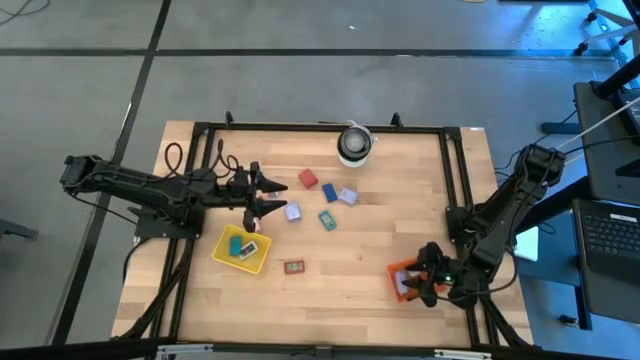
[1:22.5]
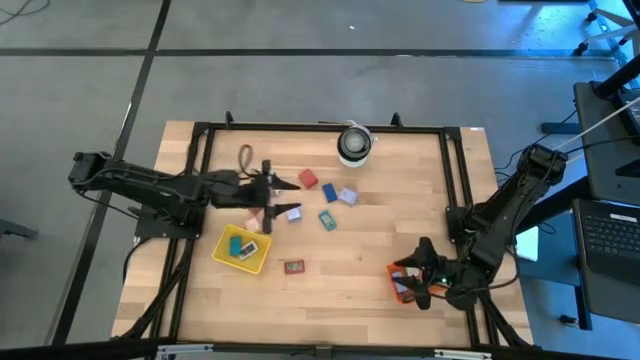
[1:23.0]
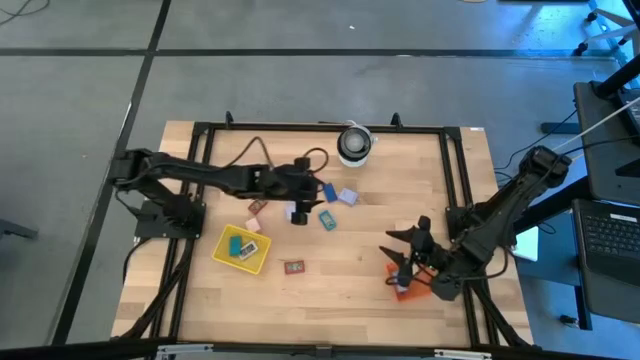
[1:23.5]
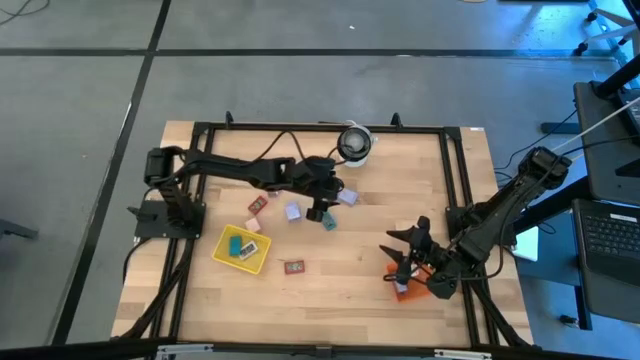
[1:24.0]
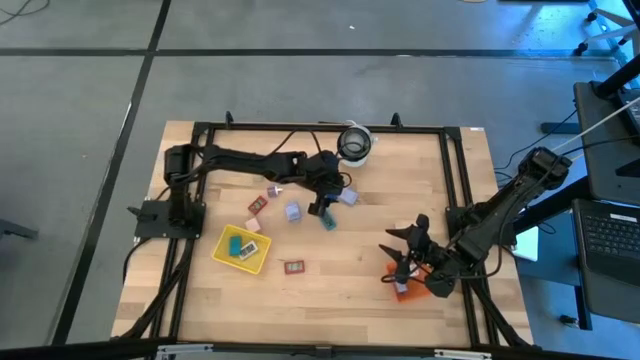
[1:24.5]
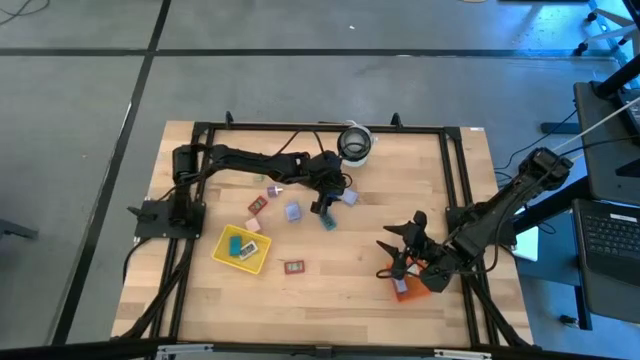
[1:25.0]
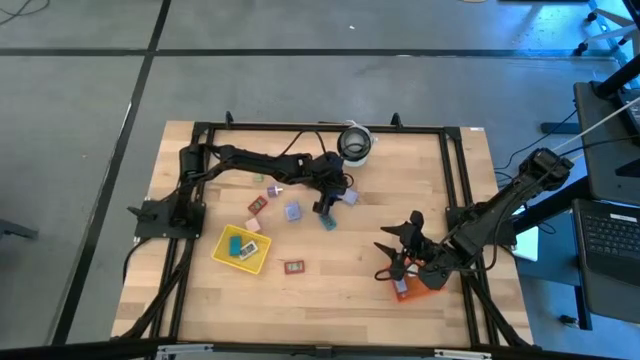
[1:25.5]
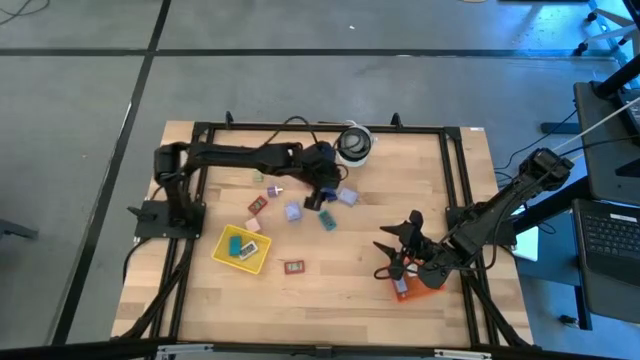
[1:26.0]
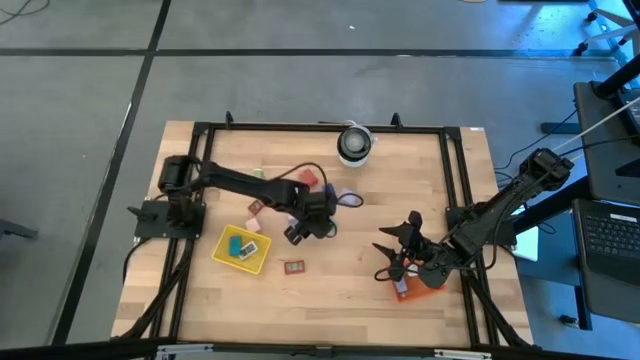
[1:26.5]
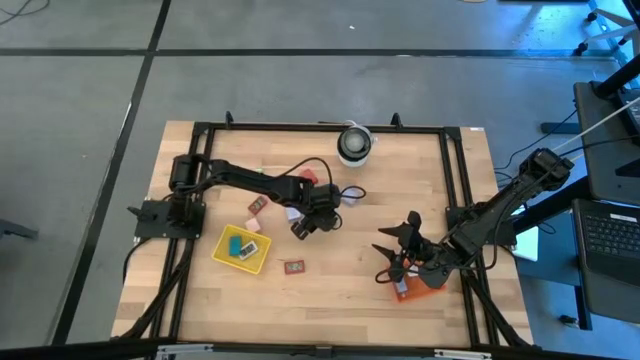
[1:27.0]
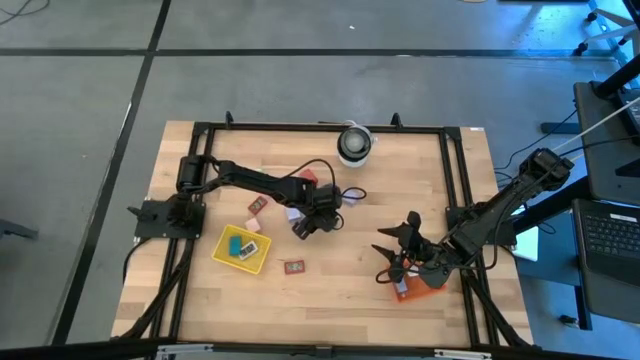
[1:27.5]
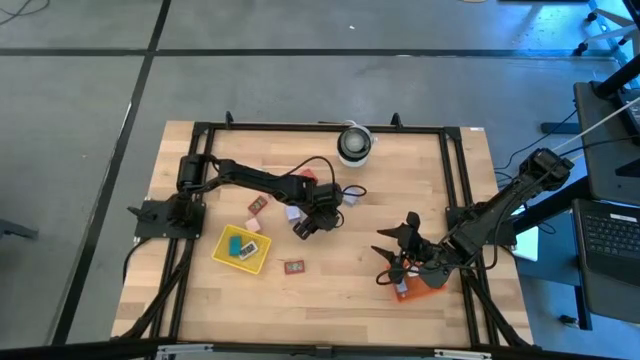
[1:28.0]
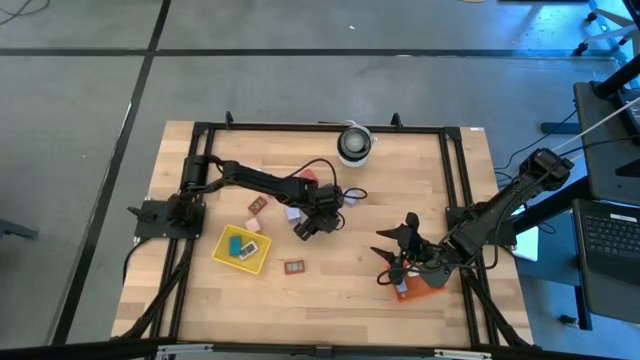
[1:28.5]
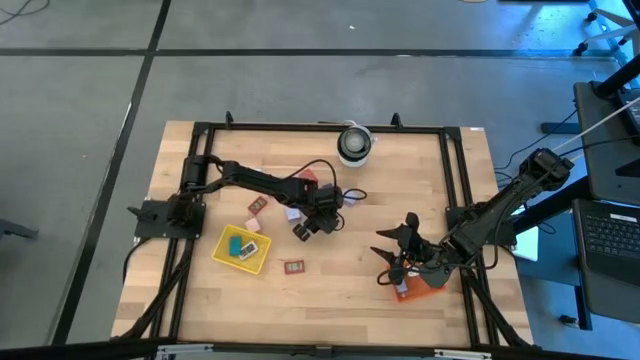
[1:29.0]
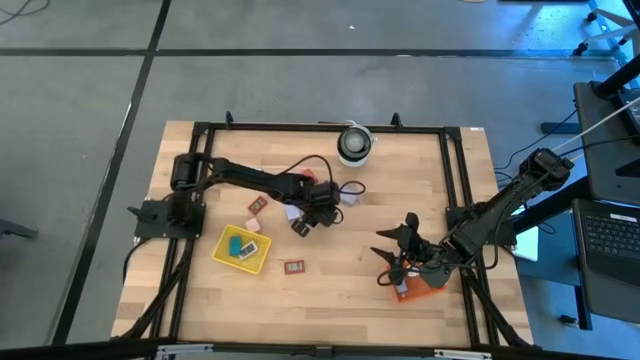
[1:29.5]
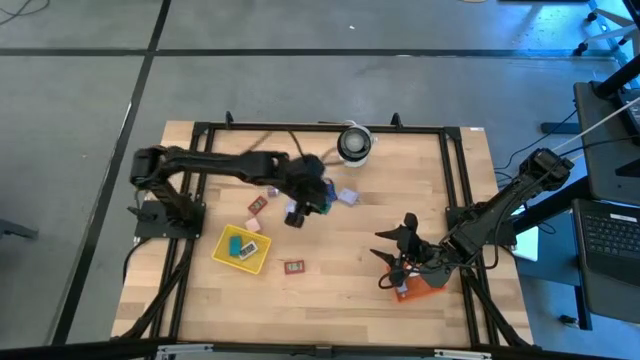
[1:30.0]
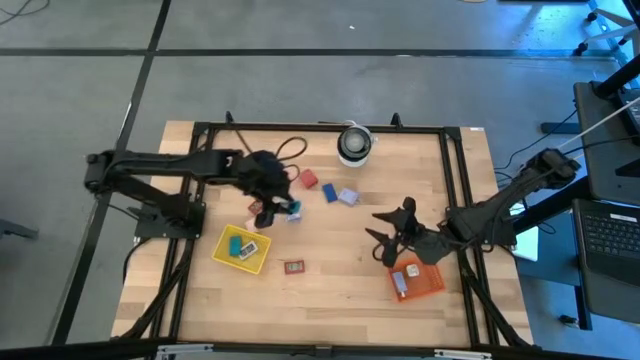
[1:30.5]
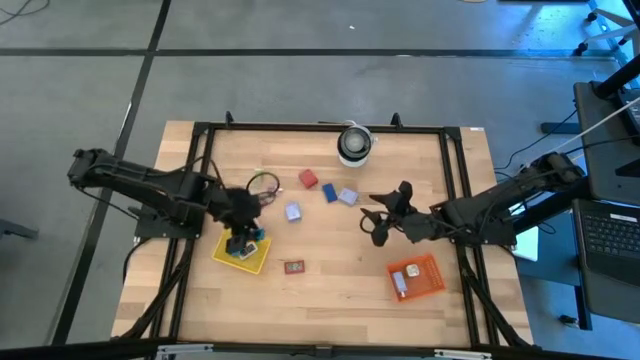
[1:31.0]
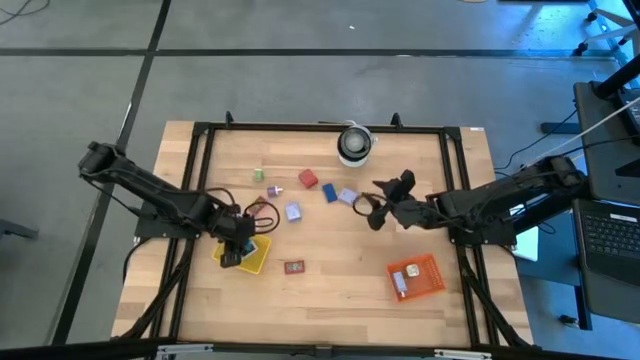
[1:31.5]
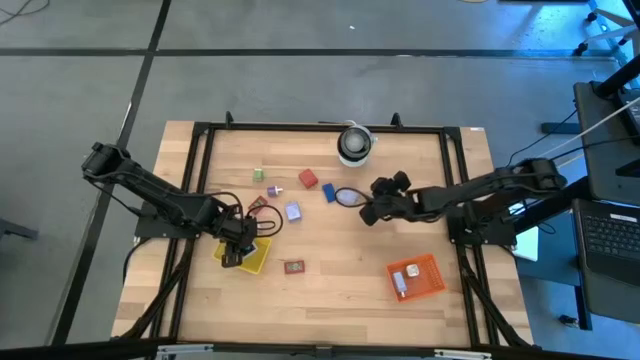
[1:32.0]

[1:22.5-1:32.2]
Task: Pick & Place Office items
Put the light blue digital timer into the yellow bin

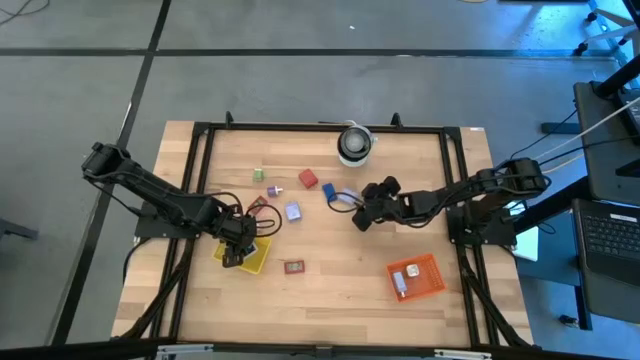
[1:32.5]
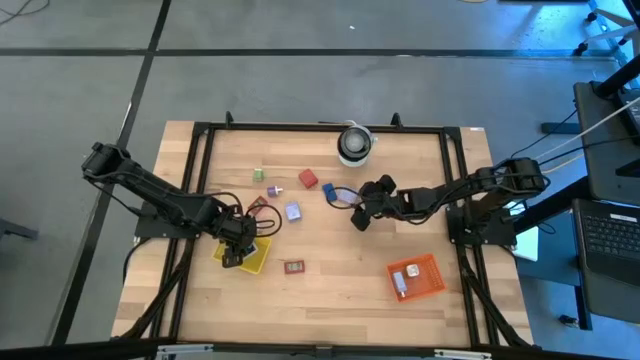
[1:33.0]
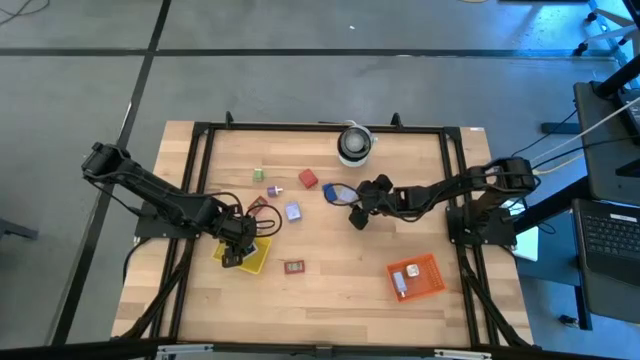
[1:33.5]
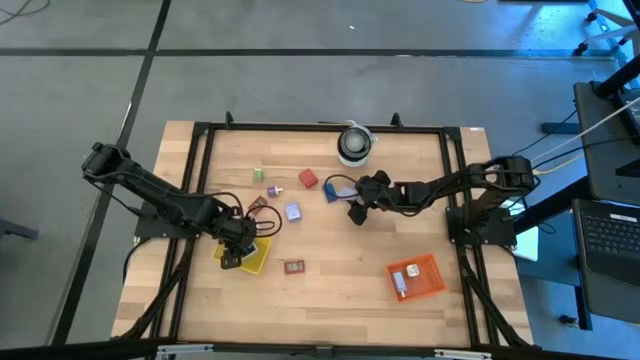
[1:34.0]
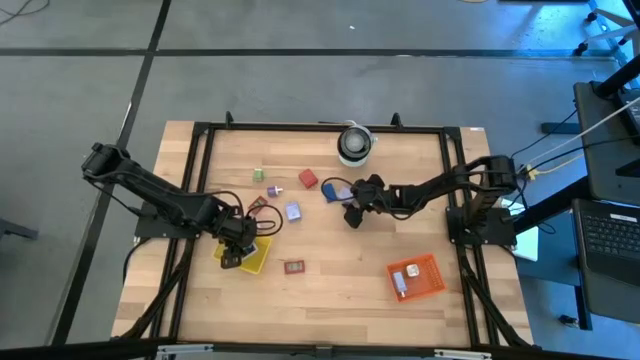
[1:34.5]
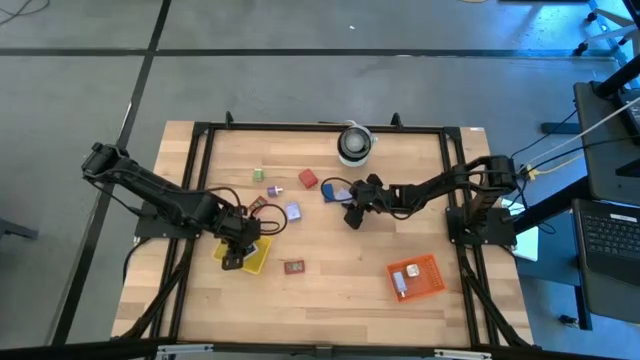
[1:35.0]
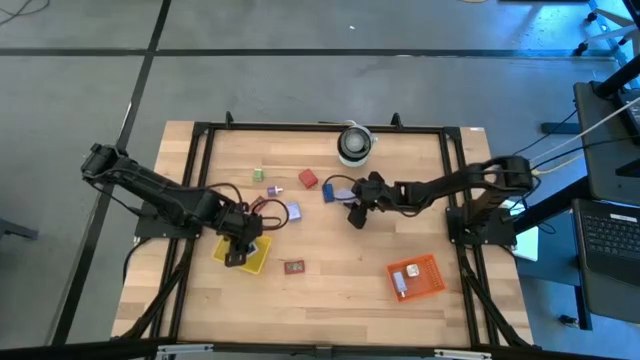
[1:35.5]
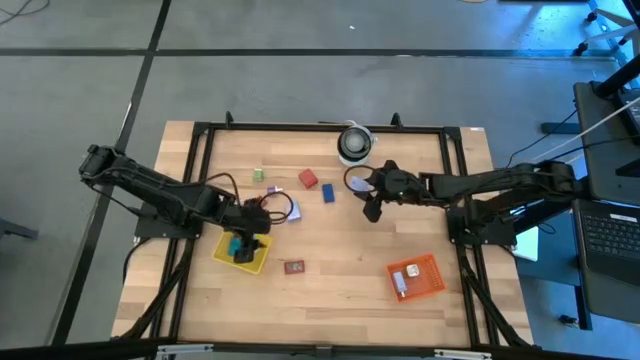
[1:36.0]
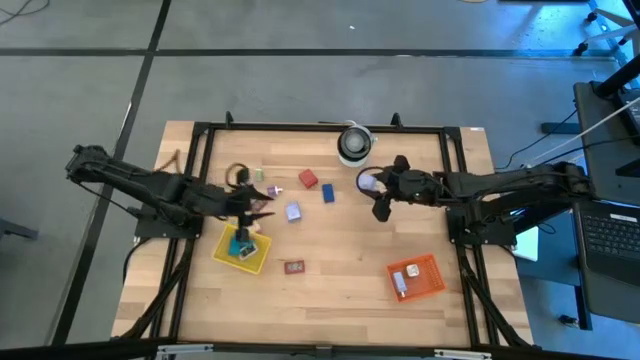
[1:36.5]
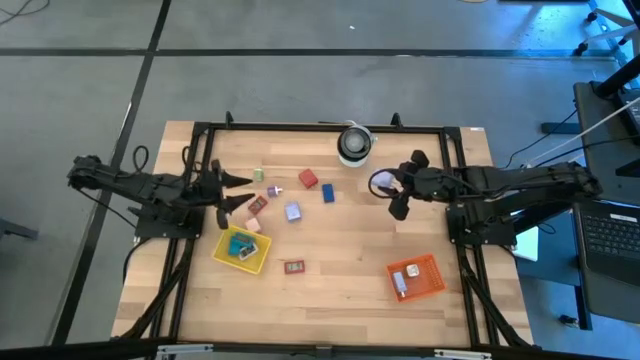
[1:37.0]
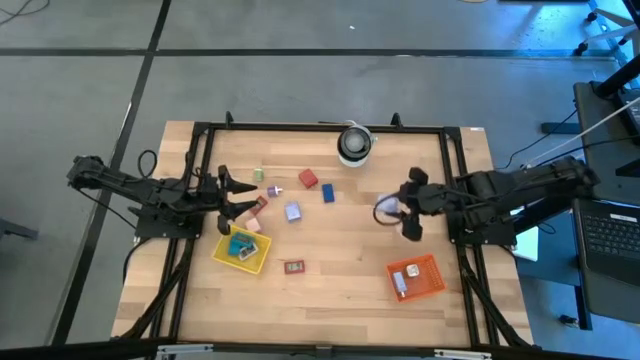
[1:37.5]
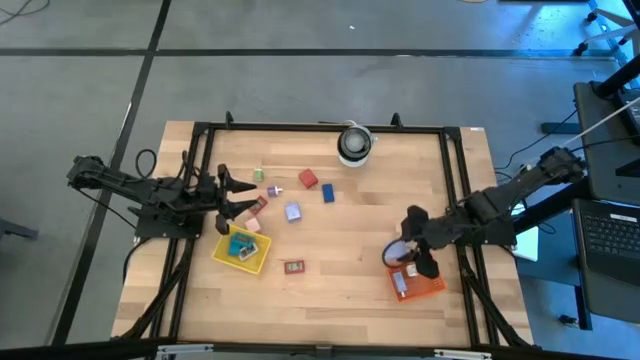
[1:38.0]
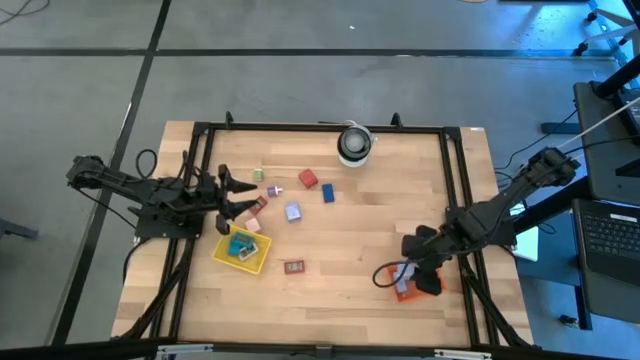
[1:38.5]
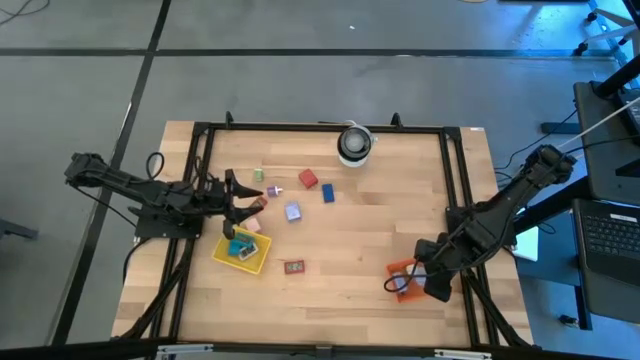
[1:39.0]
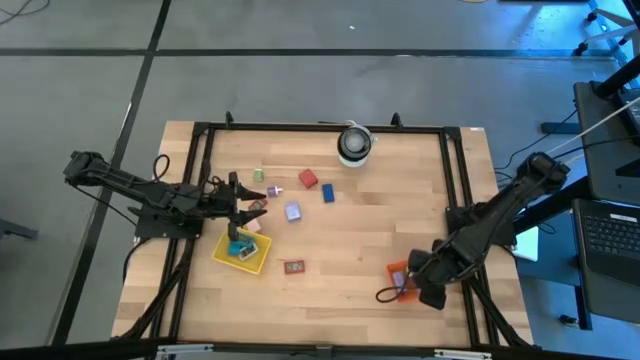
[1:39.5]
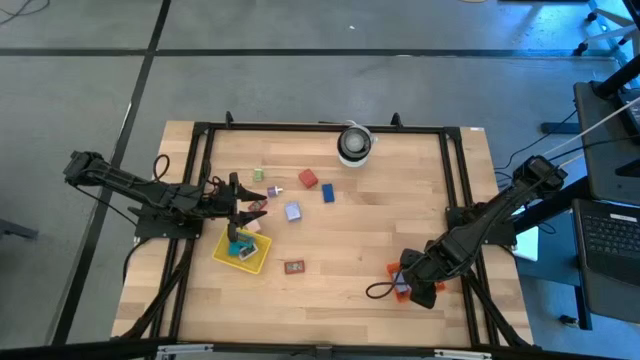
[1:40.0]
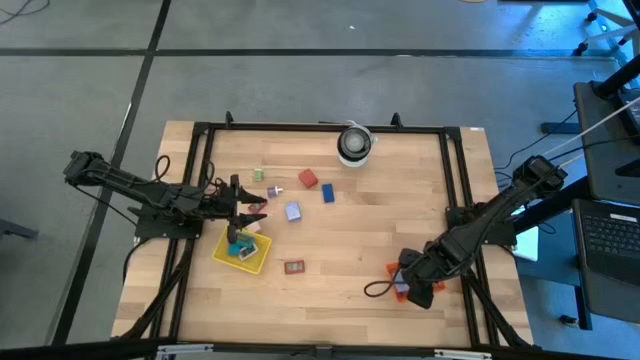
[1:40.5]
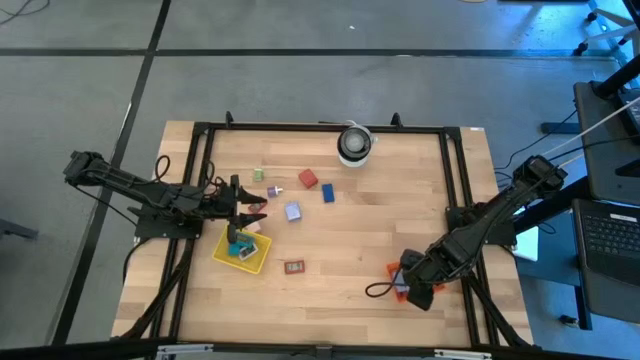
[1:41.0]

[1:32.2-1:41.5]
Put the right violet charger adapter into the orange bin
